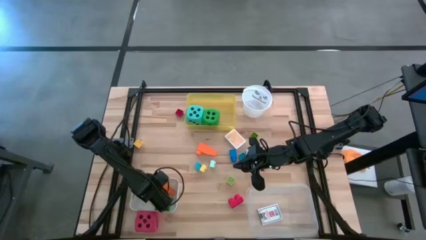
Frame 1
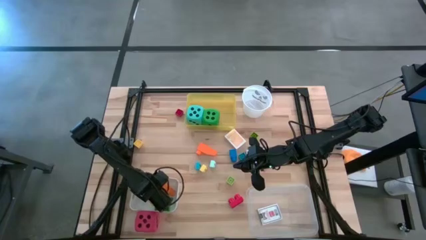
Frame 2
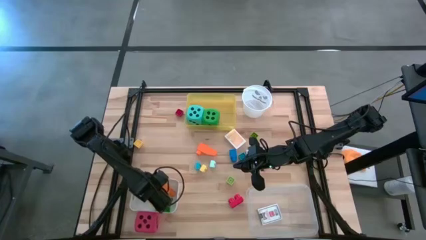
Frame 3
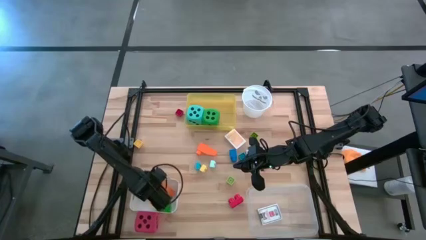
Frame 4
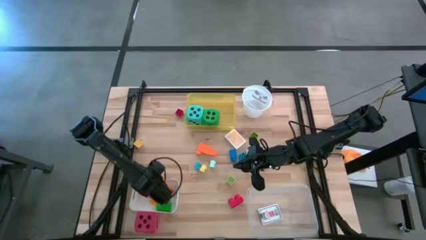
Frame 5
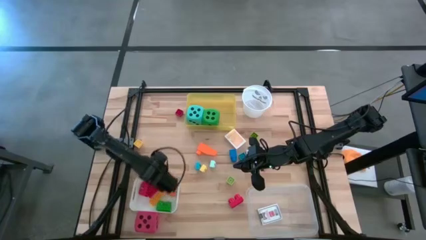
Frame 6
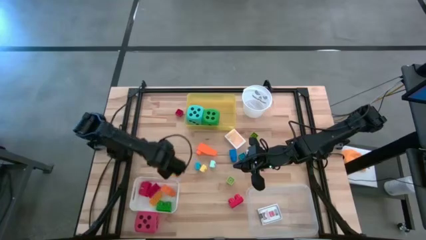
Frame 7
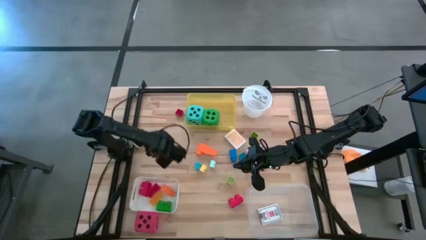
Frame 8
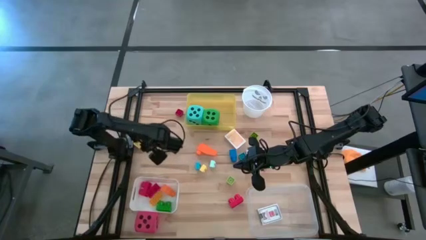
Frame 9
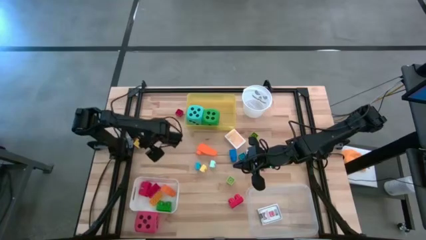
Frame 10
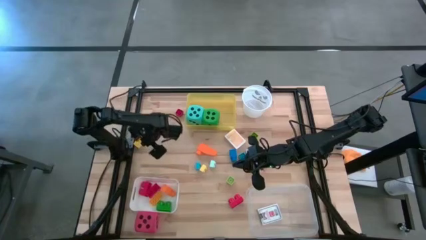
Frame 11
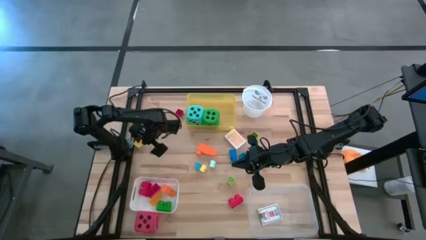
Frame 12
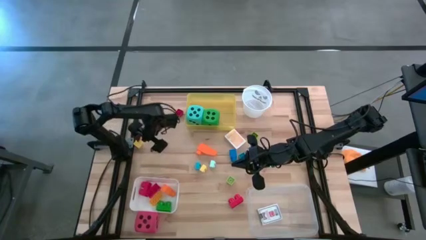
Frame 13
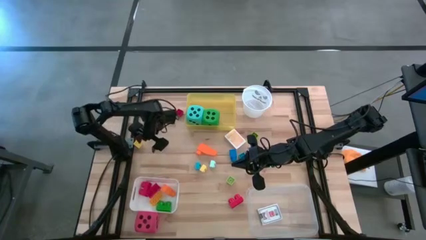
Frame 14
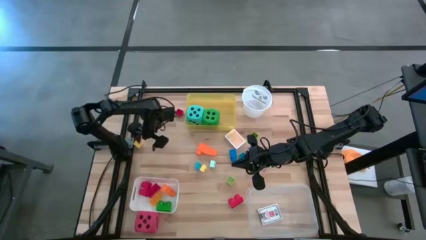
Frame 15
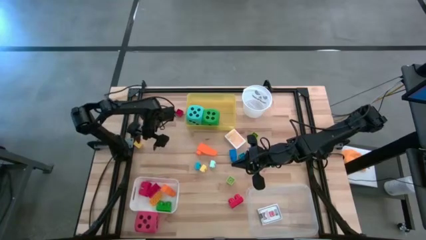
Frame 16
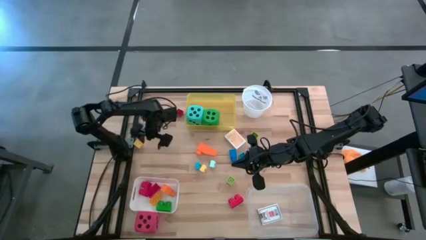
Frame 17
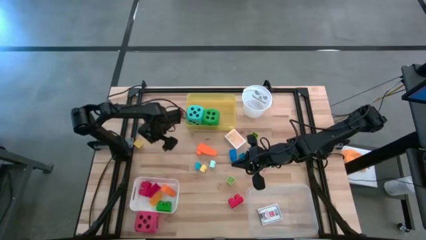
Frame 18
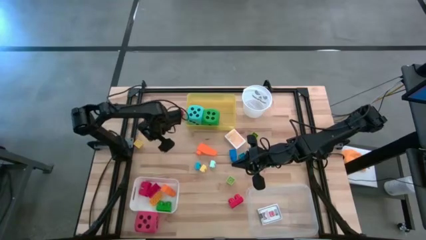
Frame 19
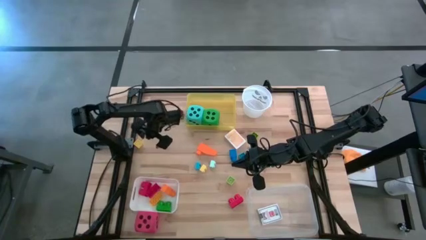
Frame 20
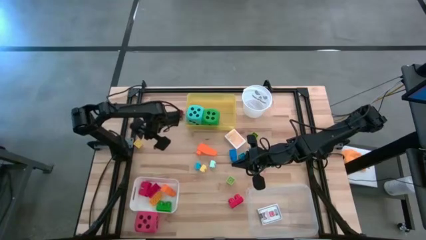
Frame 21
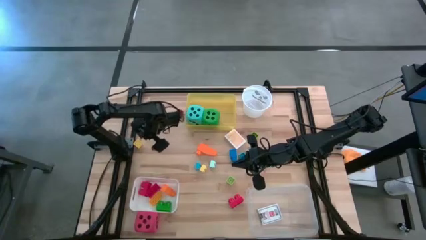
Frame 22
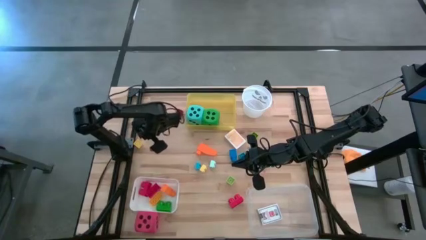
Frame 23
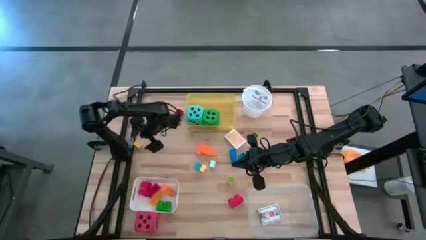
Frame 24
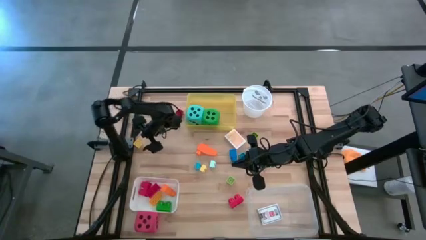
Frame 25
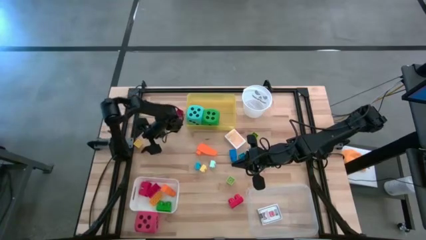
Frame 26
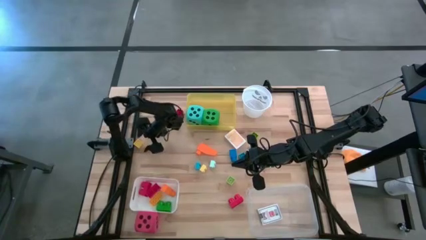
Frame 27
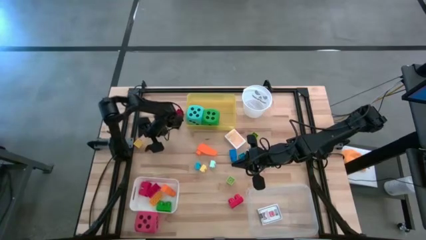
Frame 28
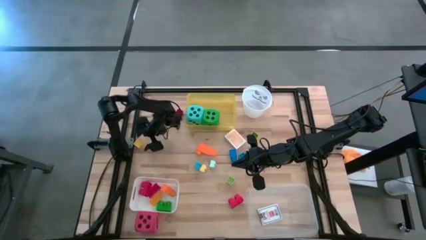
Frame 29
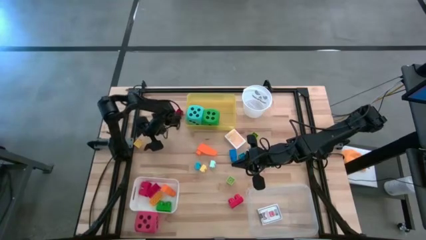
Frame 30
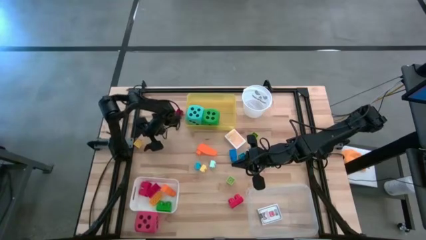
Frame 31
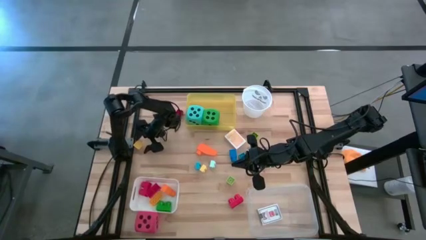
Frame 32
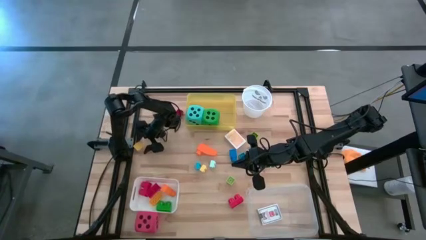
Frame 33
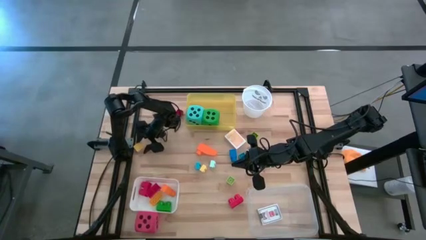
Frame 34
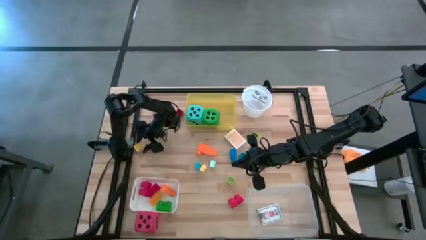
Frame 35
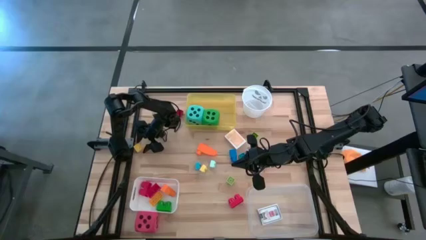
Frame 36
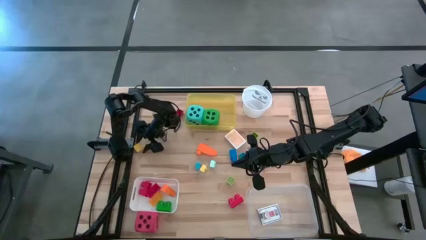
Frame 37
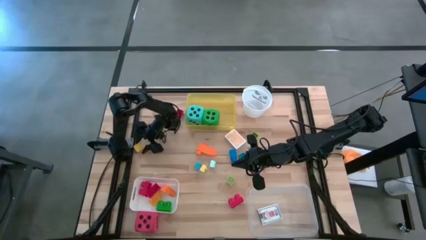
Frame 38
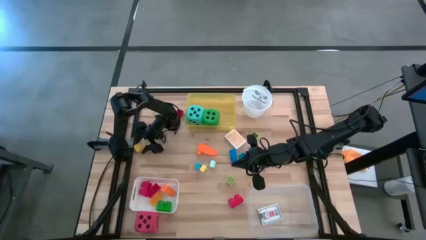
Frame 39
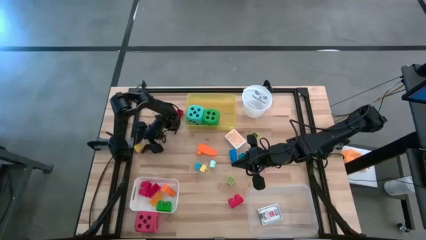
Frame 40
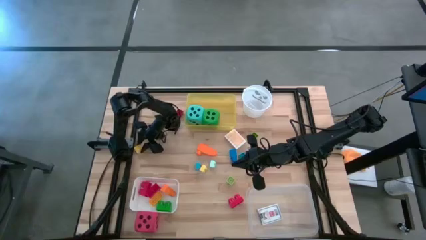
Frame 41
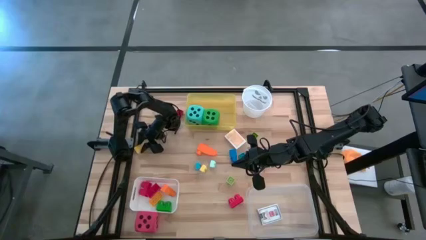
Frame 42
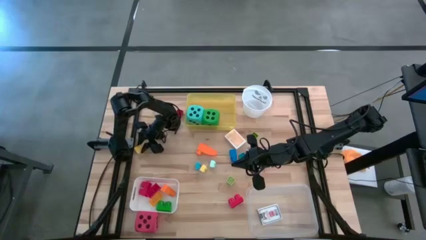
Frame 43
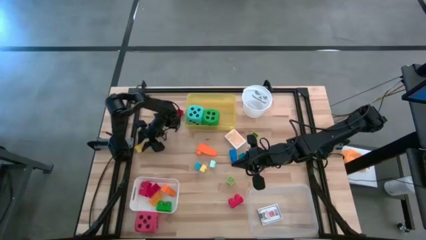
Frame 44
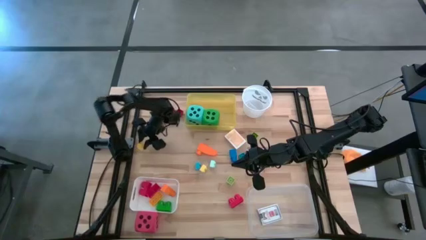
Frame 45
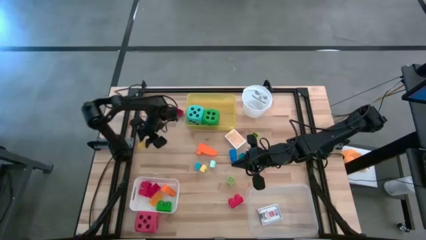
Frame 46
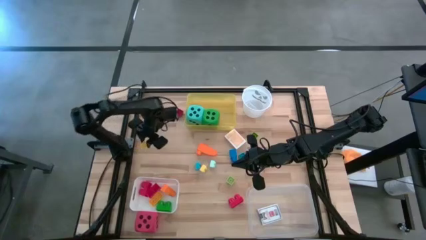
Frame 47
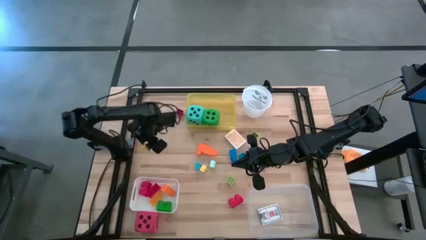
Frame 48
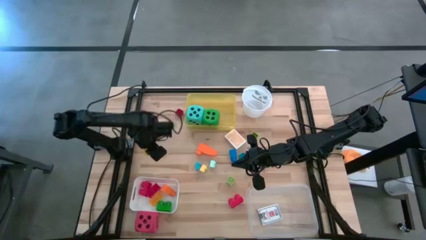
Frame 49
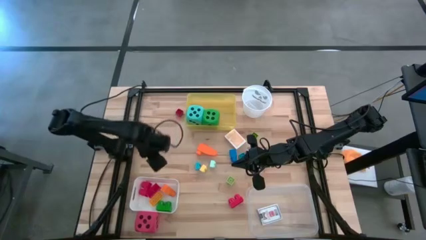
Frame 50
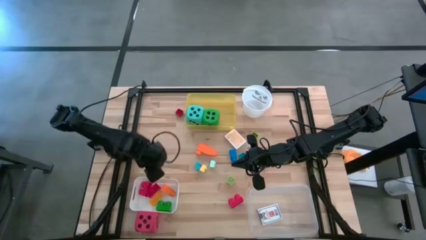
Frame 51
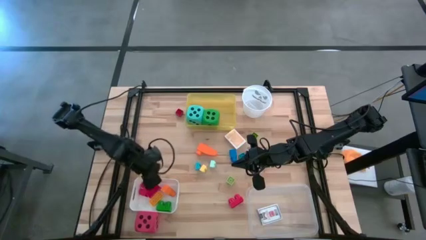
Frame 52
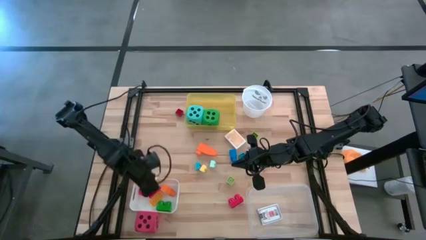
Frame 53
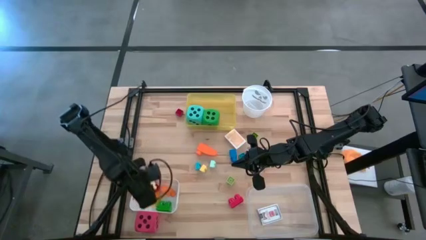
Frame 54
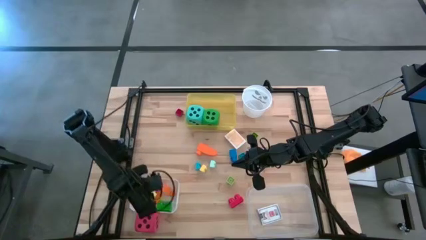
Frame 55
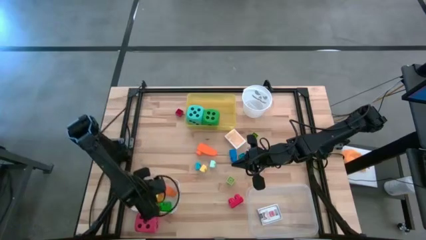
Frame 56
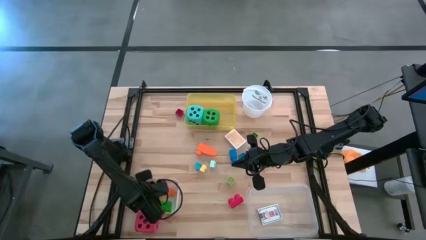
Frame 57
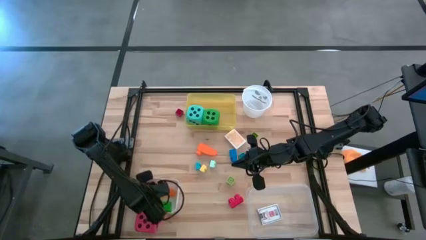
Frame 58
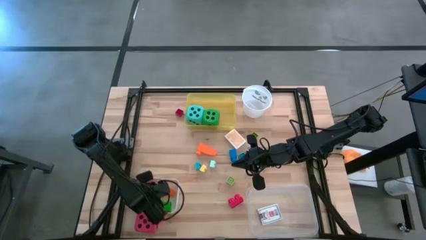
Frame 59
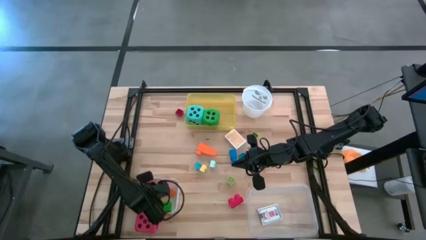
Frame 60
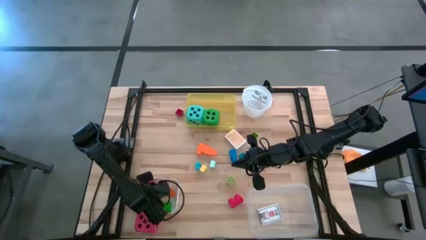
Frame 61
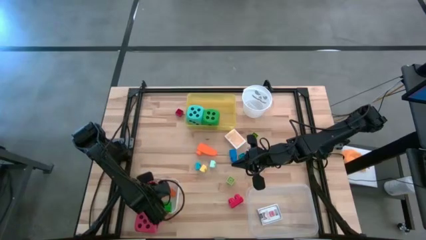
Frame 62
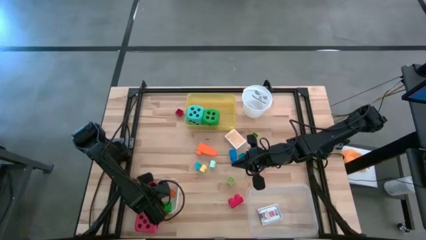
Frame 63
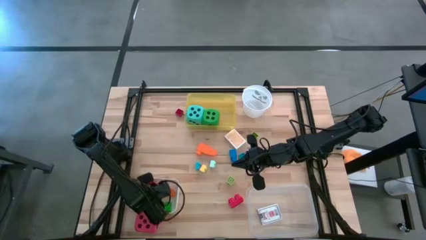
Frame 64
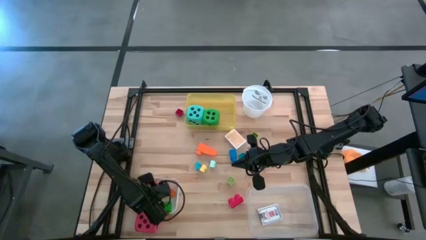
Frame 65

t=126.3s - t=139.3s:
Task: Pick & Place Toys
Put the top yellow game piece into the white bin

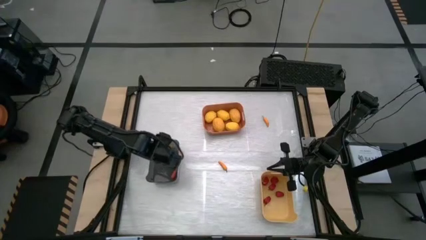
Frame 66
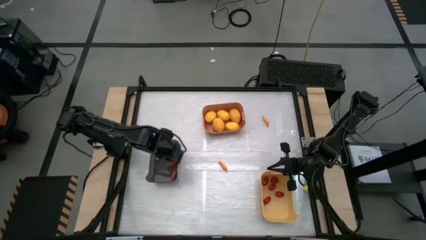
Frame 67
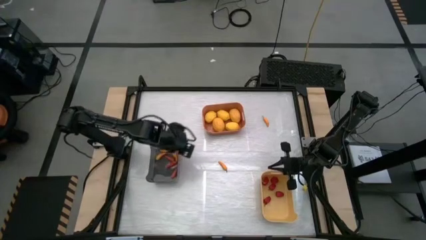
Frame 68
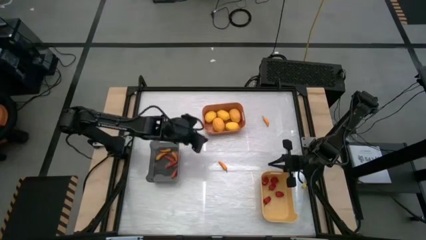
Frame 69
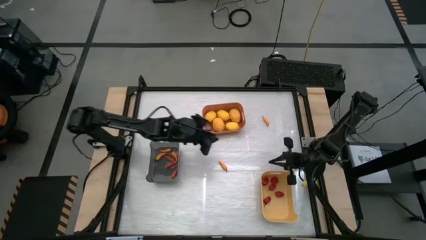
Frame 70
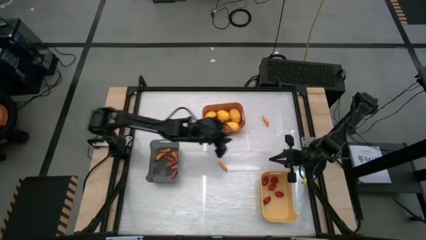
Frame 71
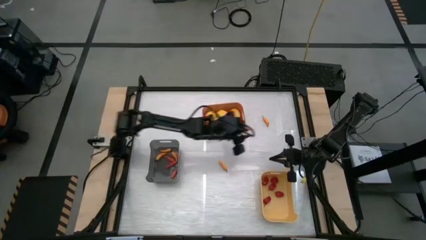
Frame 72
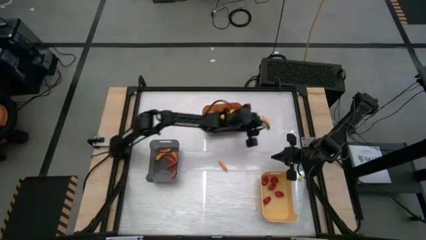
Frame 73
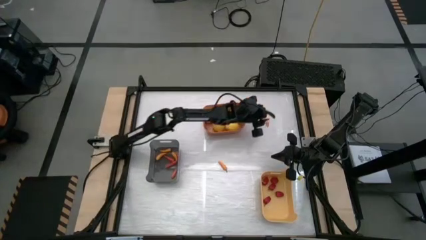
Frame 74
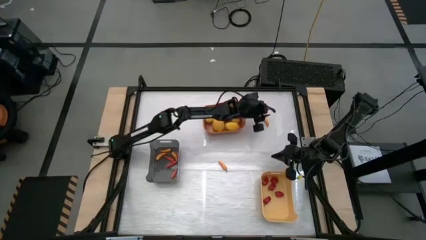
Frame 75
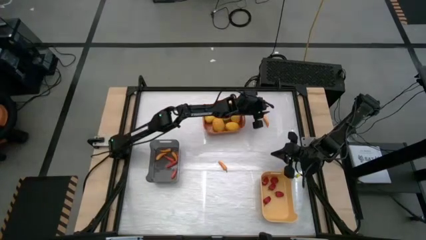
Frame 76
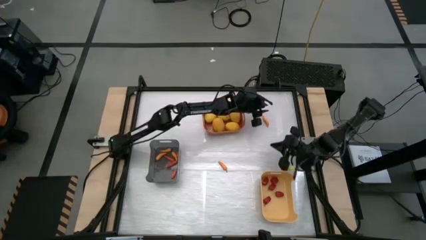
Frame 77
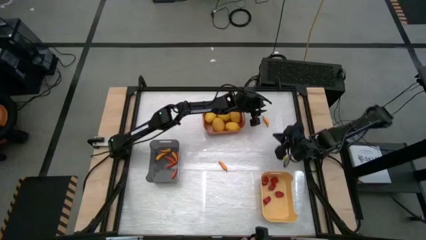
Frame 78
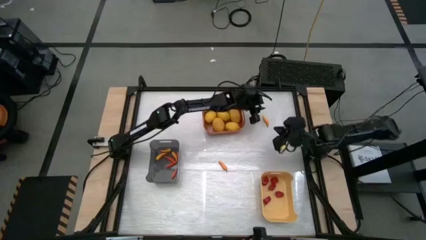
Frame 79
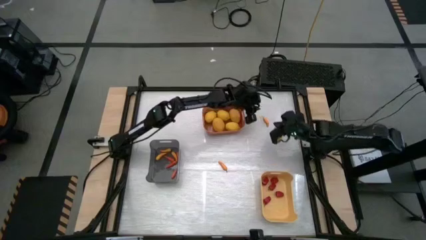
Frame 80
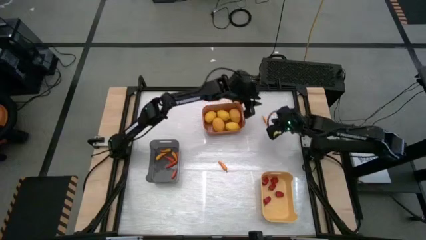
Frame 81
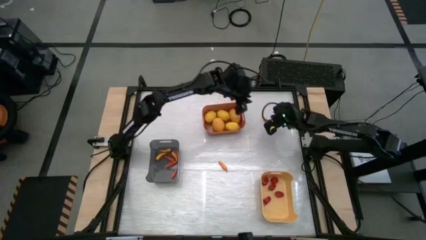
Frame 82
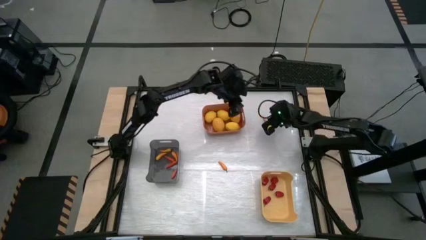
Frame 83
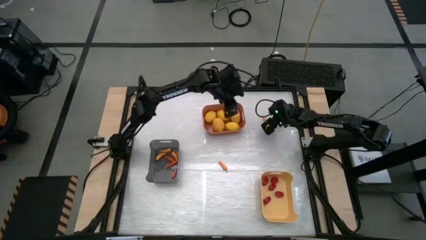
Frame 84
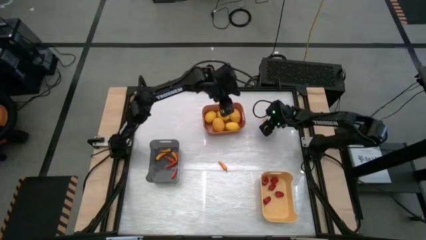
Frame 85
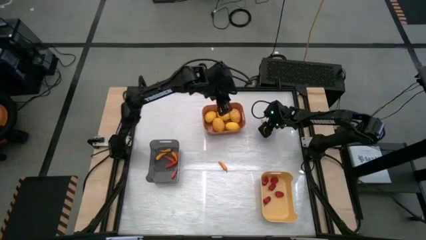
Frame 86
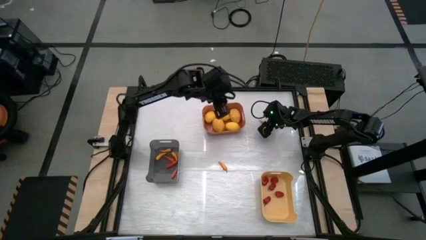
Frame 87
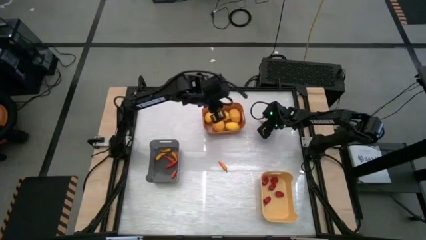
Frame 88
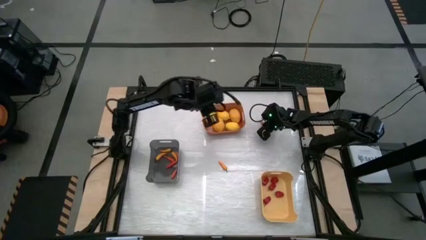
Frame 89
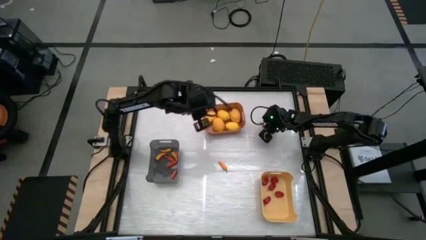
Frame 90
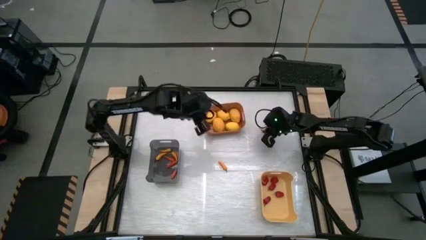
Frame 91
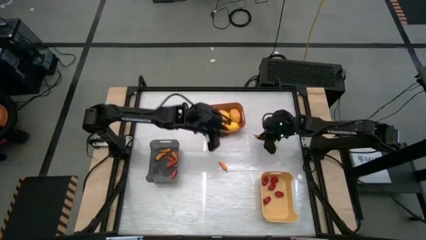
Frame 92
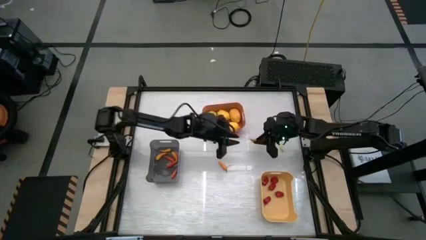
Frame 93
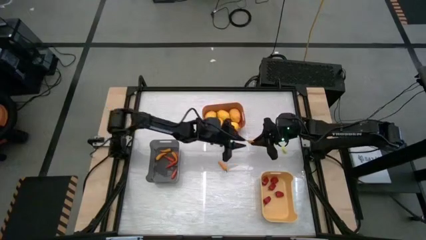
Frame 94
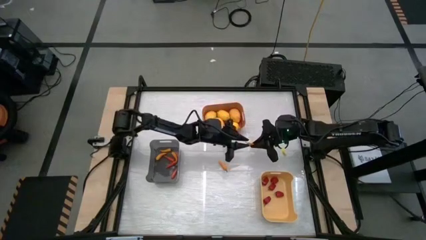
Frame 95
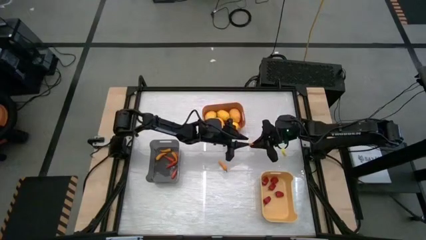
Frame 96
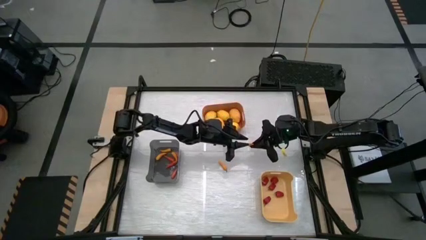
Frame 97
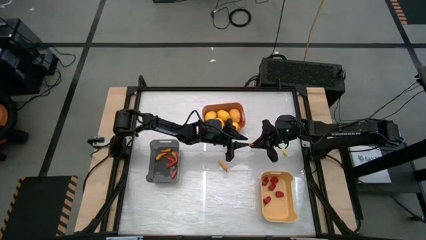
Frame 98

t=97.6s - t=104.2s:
Task: Sort produce into baskets
Put the yellow chili pepper into the black bin
